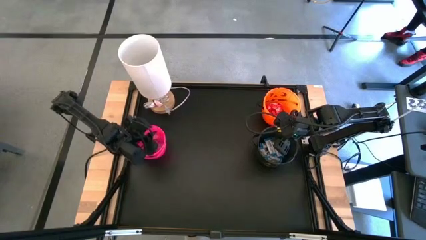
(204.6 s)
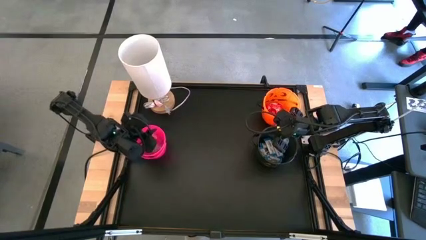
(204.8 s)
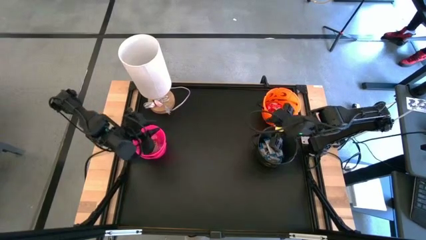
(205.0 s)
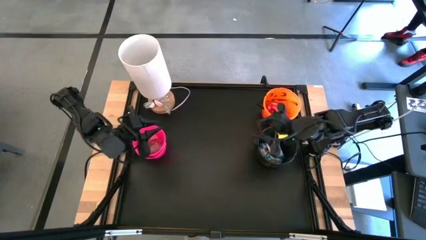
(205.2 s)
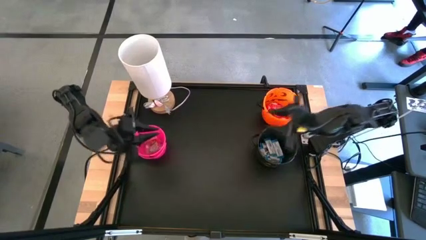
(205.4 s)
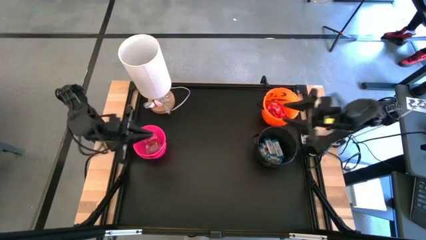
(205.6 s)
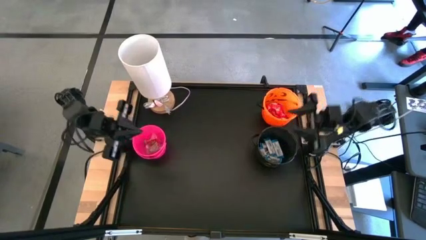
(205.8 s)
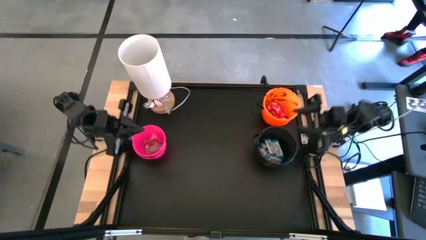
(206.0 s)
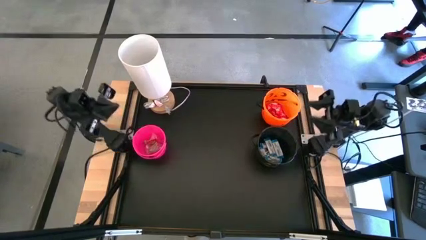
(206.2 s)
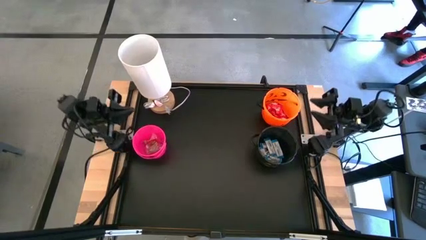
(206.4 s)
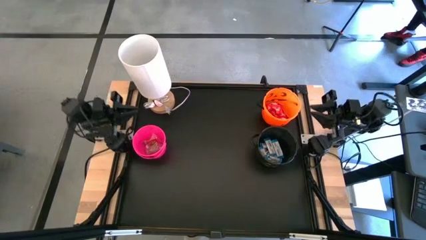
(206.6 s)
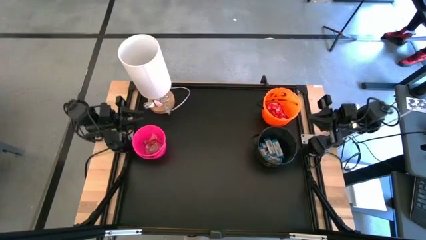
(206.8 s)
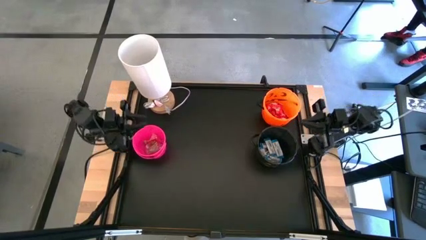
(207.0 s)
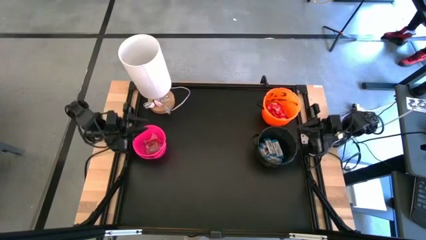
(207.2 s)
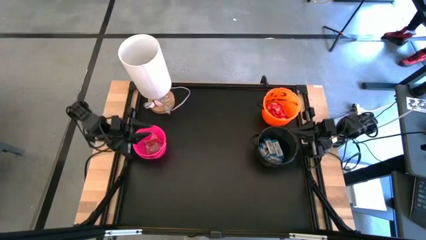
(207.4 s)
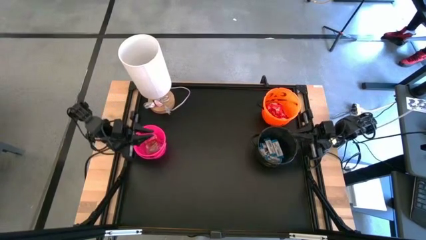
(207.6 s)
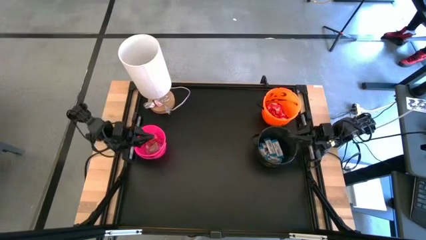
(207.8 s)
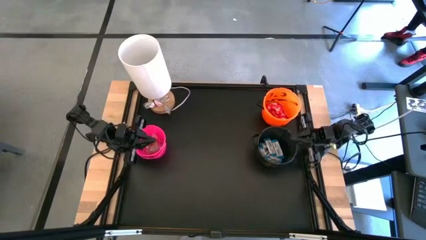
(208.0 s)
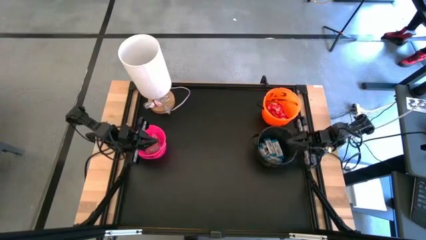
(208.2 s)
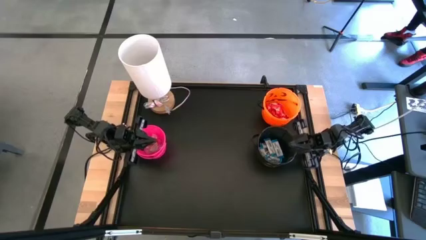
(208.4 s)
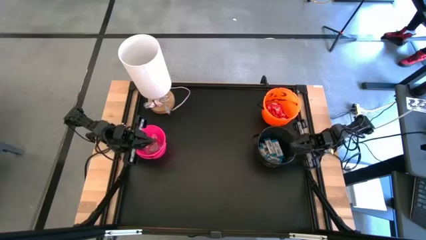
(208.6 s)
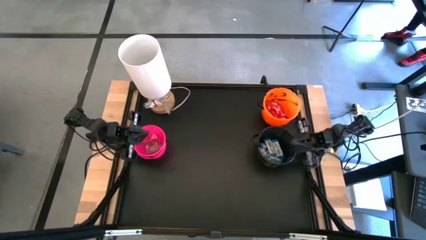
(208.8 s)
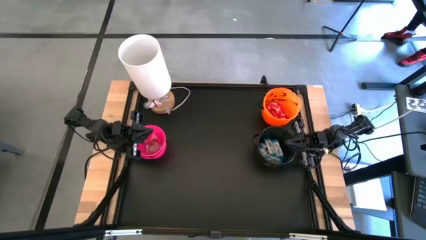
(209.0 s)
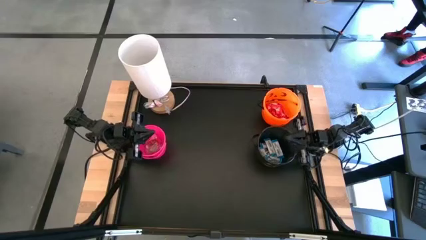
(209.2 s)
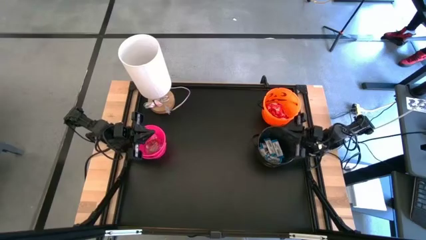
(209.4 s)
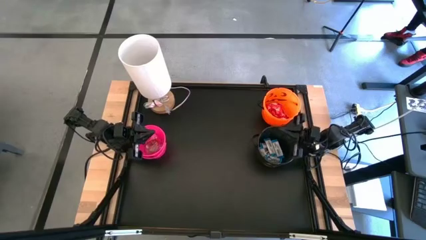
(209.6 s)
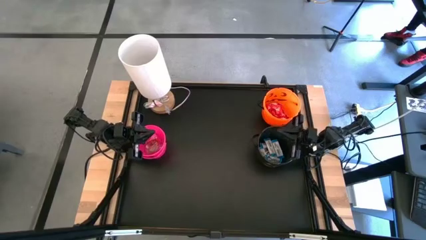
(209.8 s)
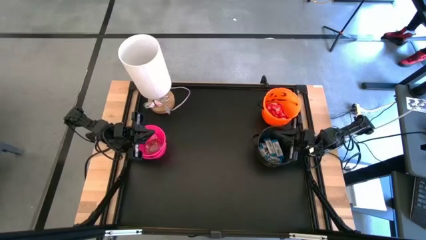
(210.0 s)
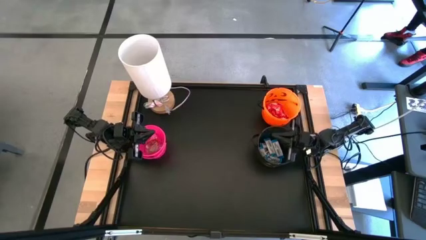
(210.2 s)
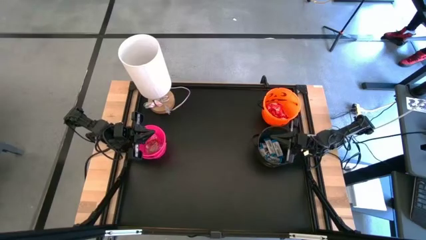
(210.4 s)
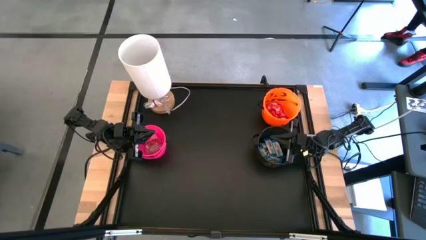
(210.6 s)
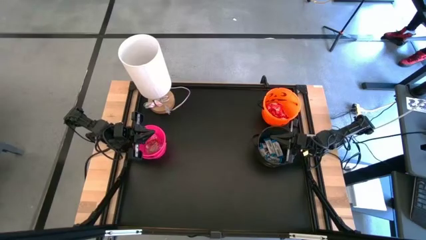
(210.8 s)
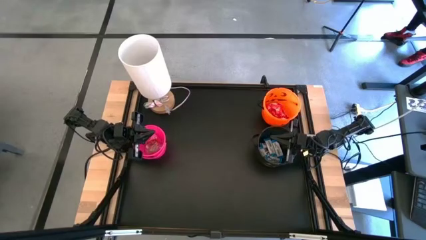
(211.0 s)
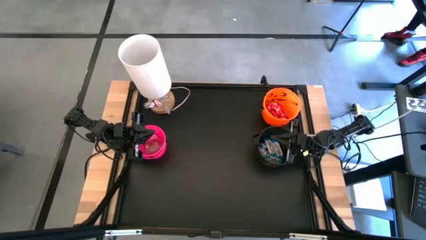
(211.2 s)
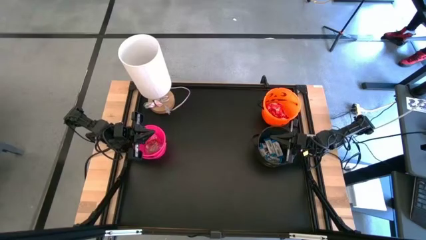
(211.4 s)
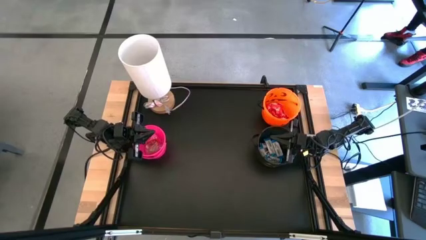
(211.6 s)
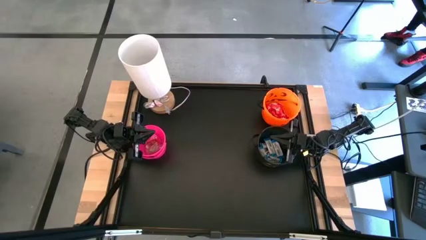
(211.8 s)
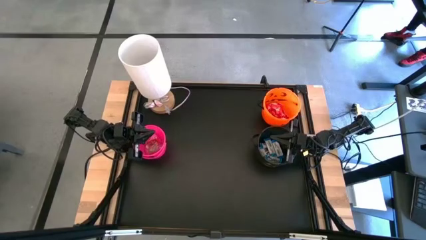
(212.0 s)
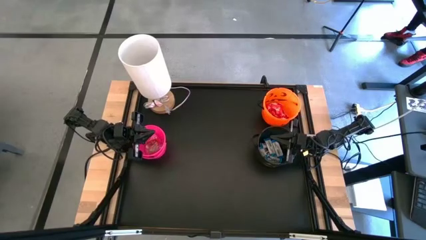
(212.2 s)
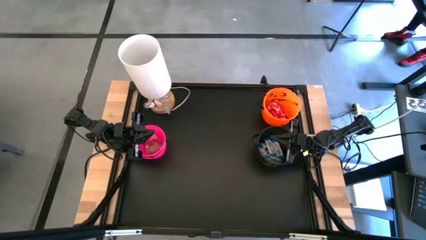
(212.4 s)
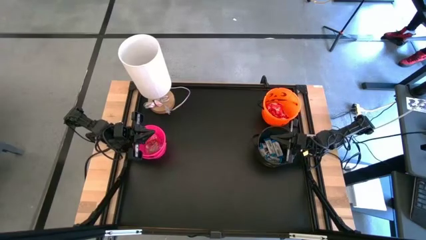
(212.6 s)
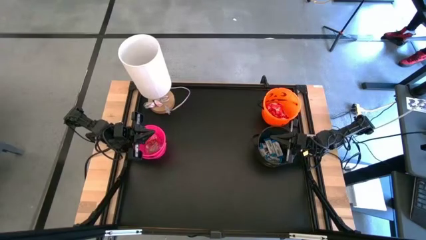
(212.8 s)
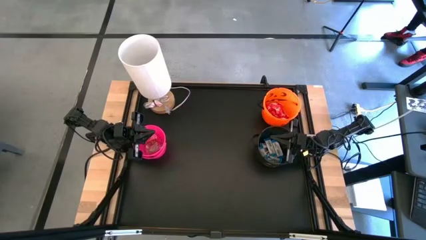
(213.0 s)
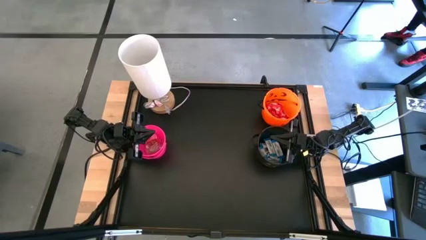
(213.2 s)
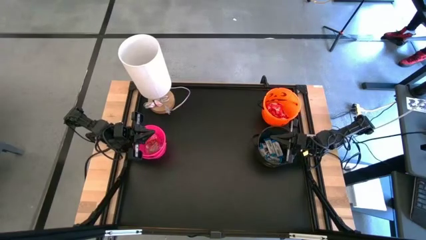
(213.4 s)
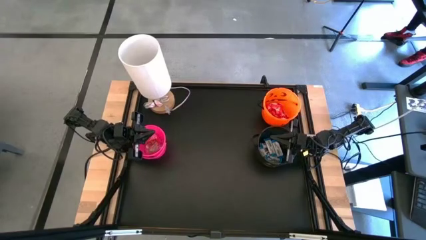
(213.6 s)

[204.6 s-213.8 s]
Task: Sort candy
Return to Home Position

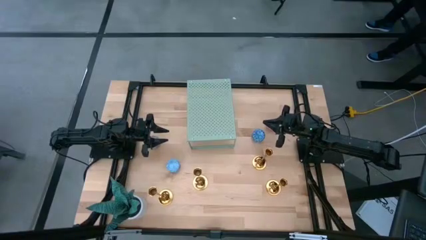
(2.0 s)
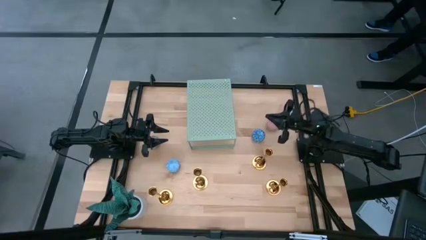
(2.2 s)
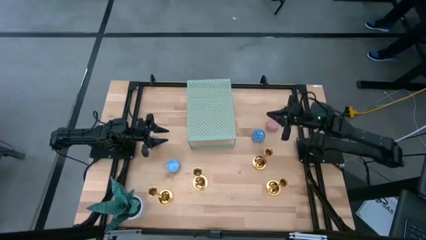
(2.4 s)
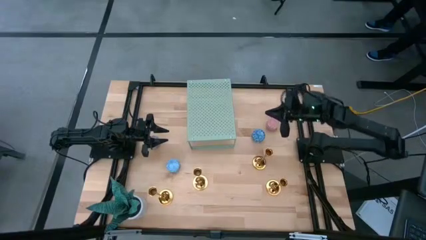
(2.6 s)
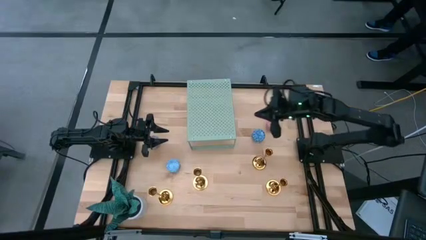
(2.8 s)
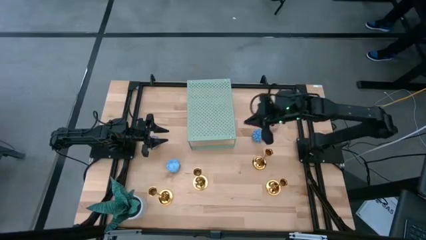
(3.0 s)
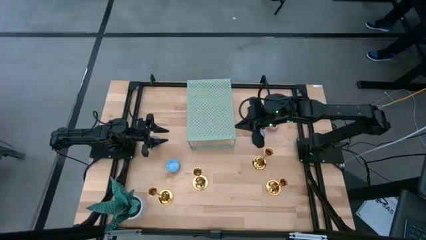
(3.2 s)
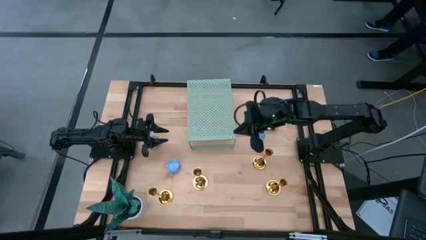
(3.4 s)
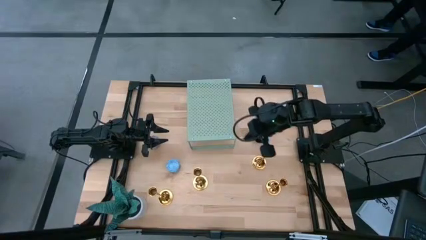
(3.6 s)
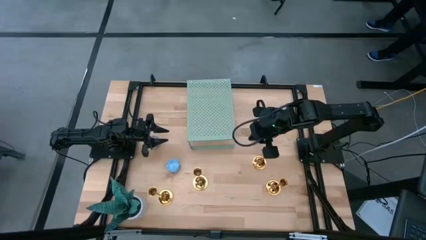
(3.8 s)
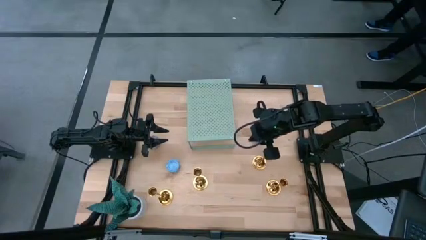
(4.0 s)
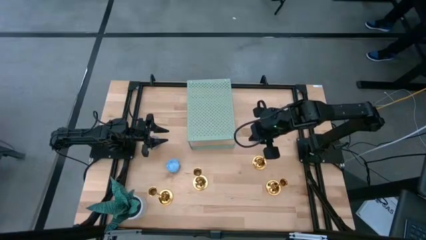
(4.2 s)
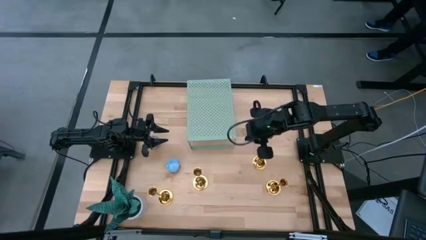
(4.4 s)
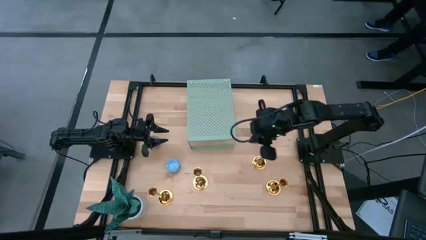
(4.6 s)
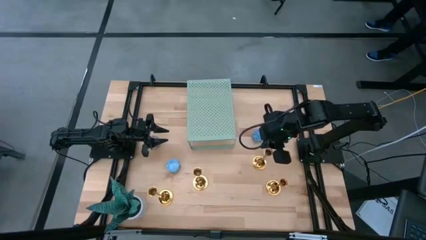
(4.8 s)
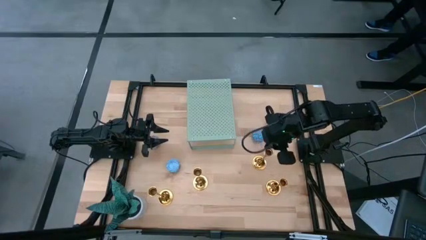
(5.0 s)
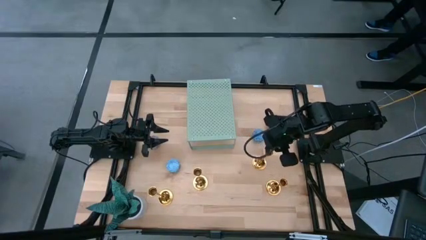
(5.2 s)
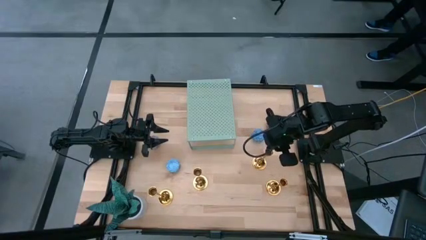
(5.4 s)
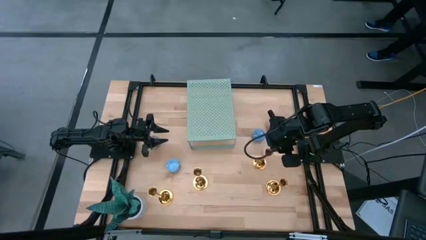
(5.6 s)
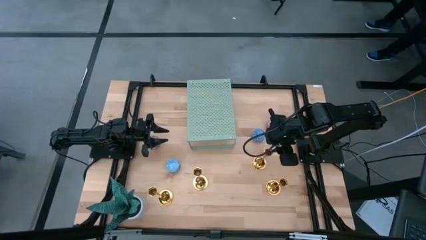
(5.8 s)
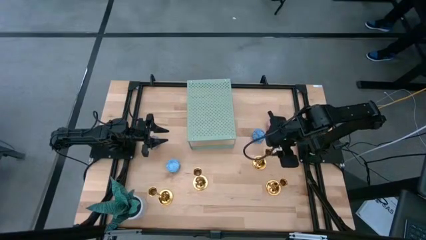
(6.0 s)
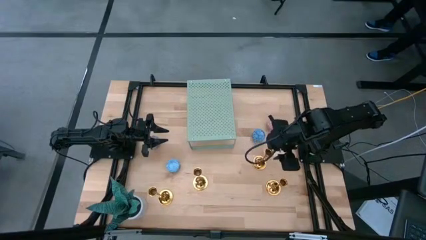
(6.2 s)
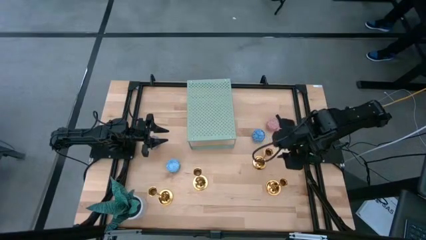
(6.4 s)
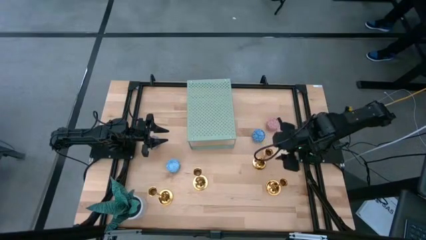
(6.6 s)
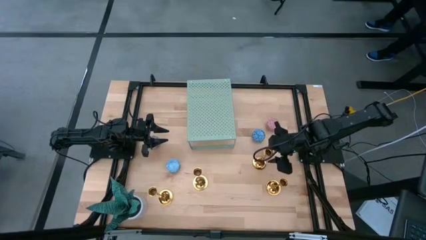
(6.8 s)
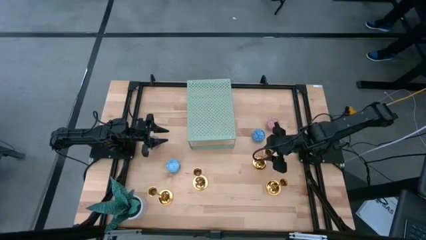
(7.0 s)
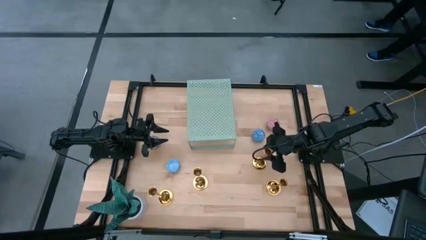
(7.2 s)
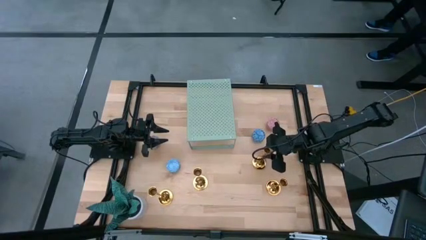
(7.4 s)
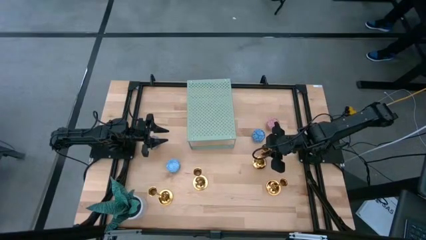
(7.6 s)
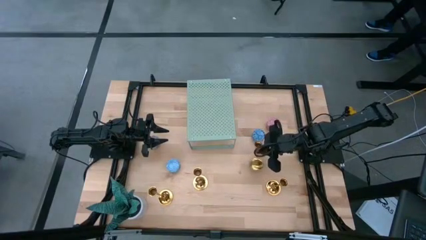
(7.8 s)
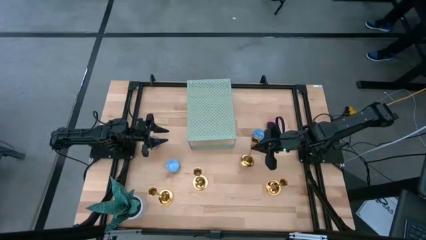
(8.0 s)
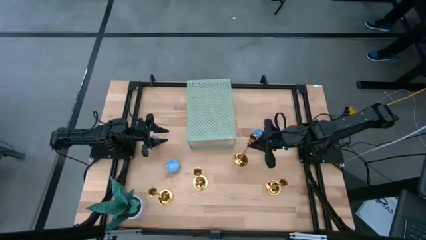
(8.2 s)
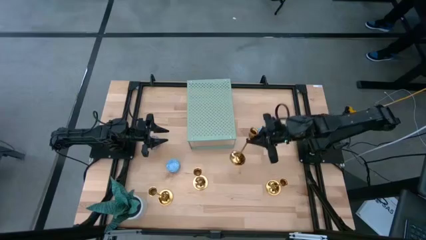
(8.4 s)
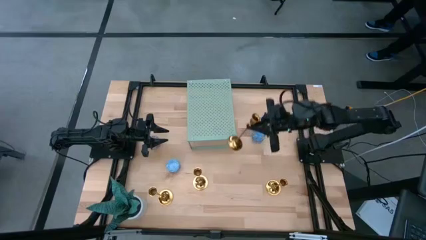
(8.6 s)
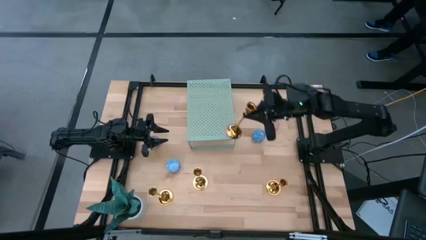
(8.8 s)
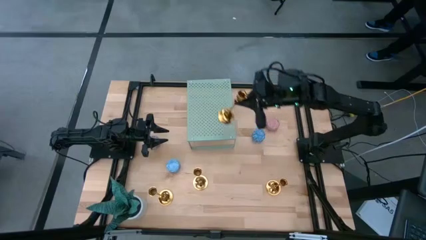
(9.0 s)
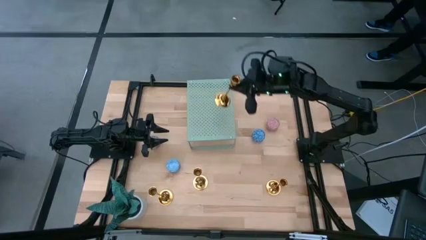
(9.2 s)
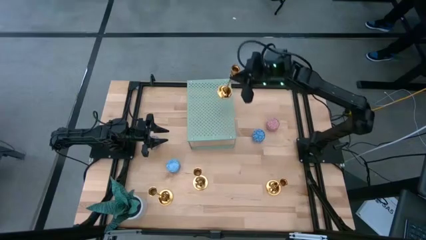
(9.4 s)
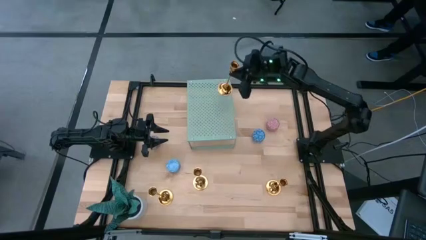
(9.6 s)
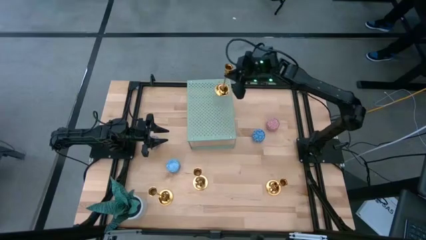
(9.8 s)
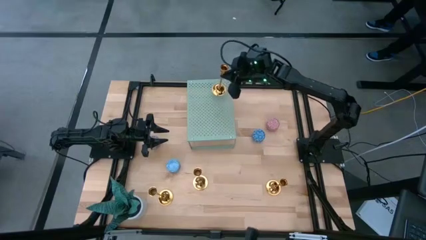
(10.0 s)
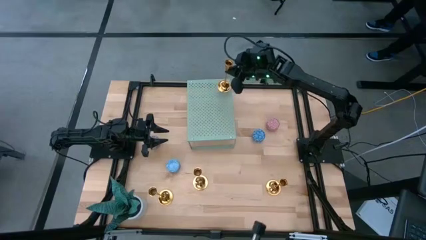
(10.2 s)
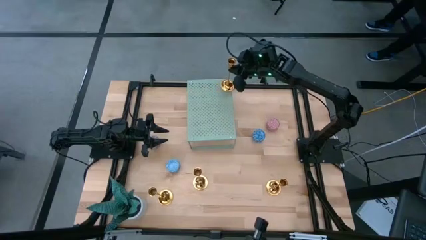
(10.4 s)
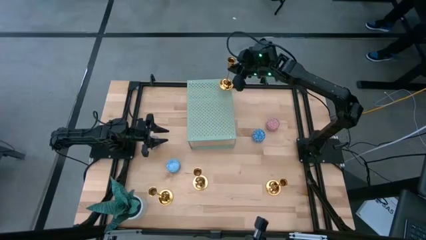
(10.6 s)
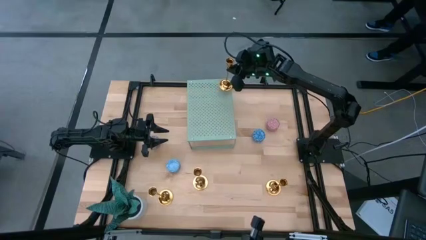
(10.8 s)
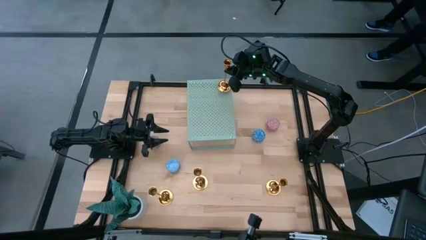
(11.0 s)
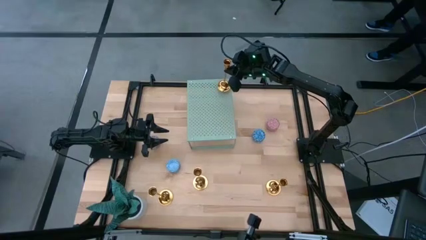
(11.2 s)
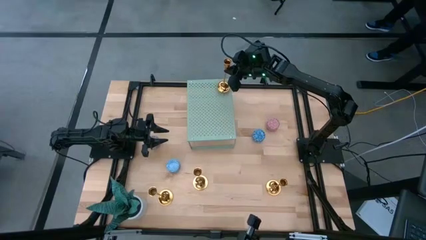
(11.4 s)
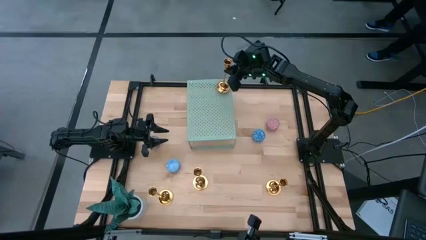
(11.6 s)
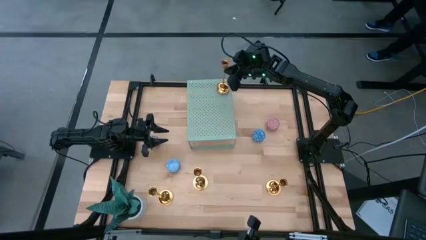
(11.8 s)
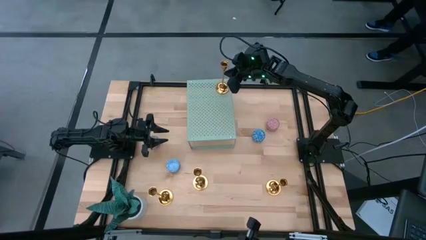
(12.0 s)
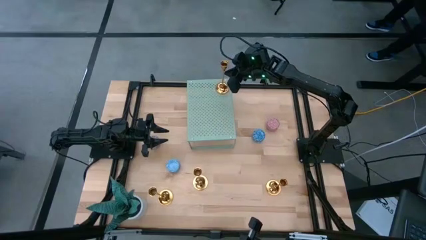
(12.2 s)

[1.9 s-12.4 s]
Task: Pick & Place candle stick holders
Put the gold candle holder on the shelf
